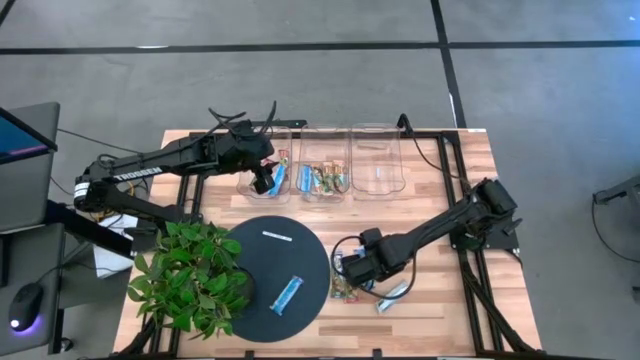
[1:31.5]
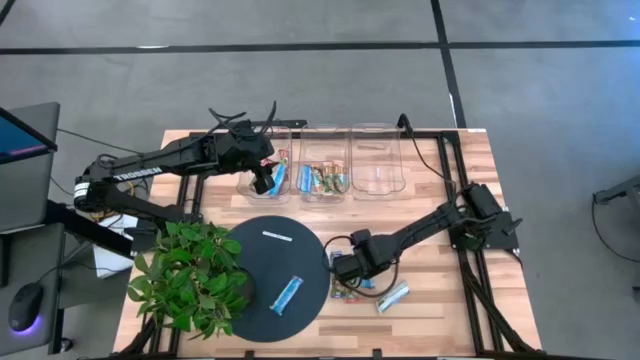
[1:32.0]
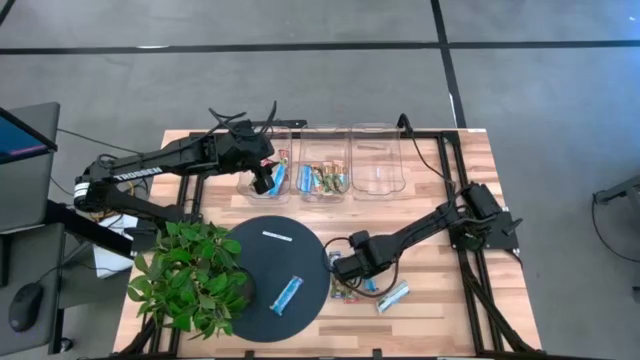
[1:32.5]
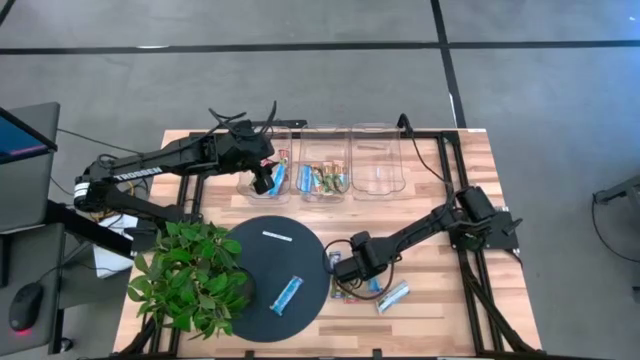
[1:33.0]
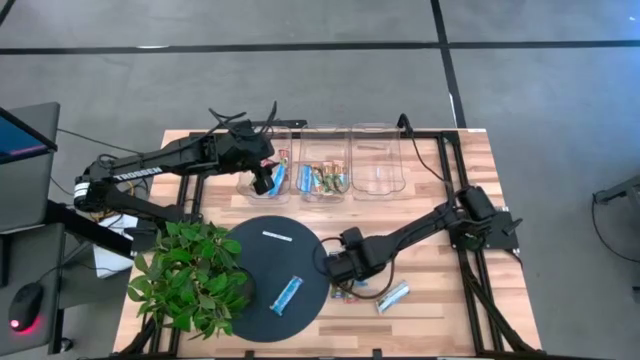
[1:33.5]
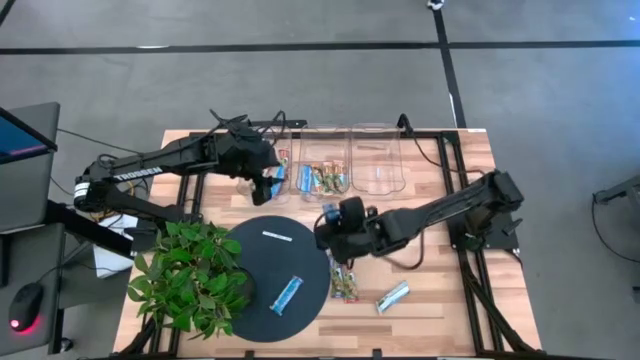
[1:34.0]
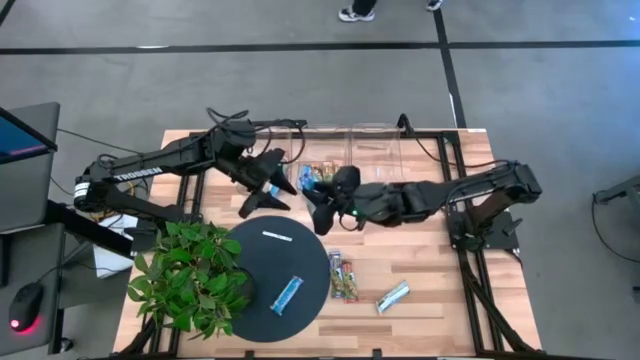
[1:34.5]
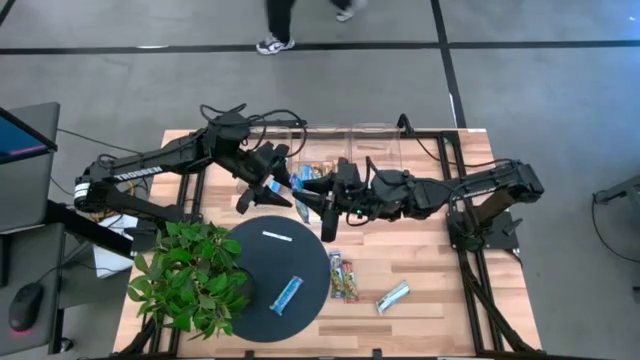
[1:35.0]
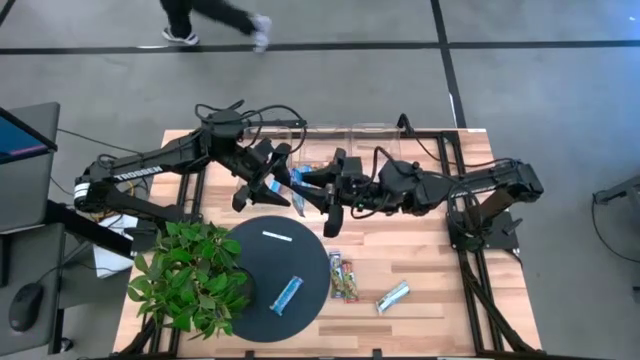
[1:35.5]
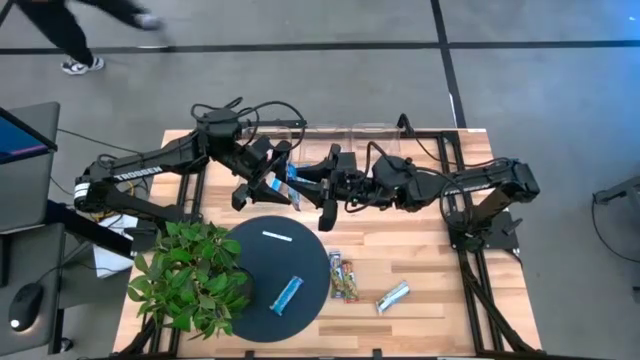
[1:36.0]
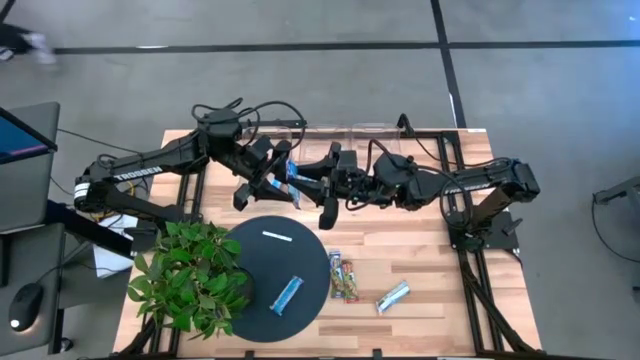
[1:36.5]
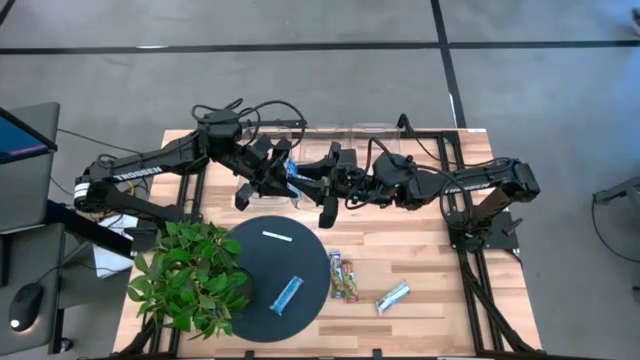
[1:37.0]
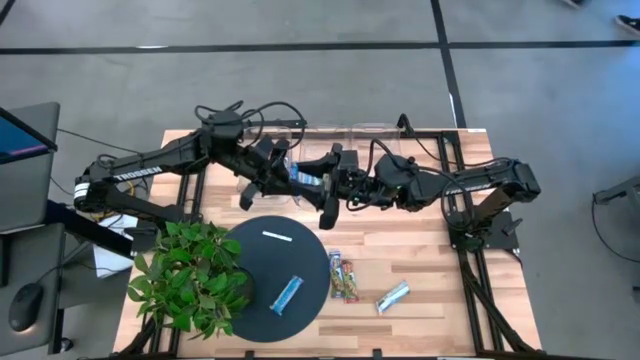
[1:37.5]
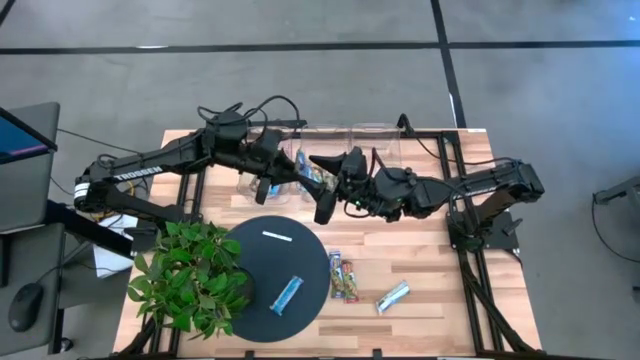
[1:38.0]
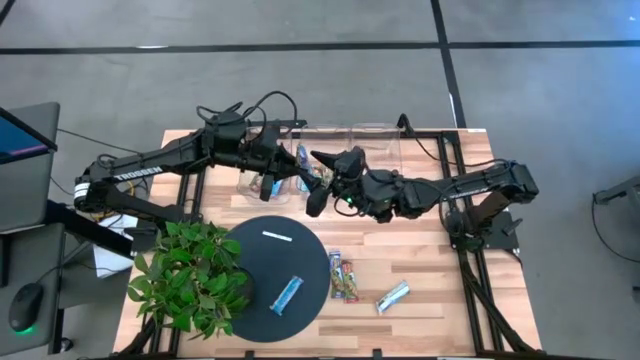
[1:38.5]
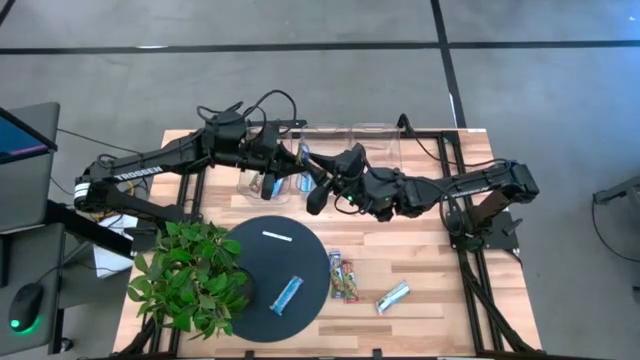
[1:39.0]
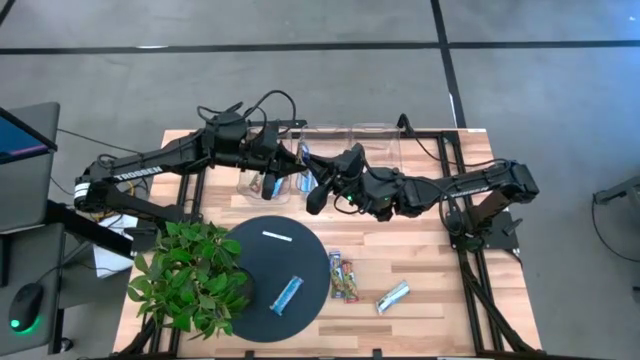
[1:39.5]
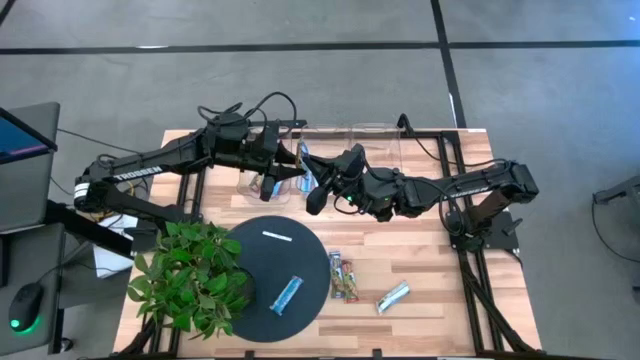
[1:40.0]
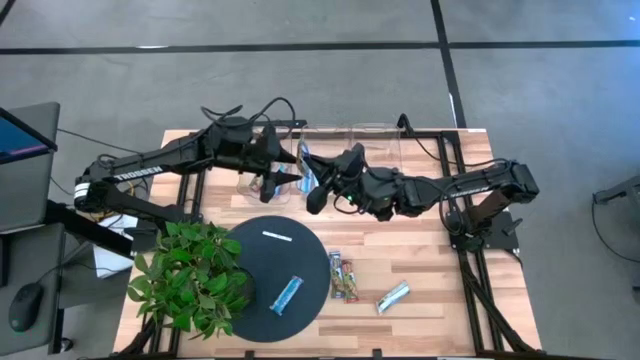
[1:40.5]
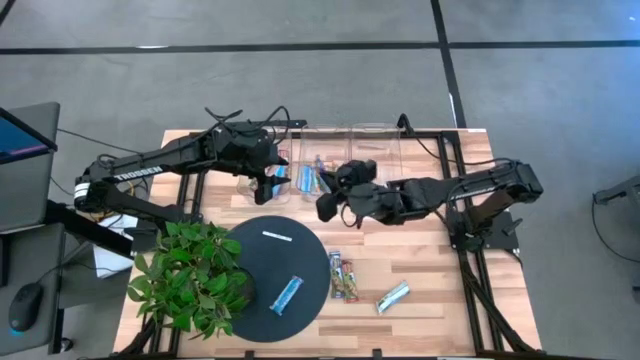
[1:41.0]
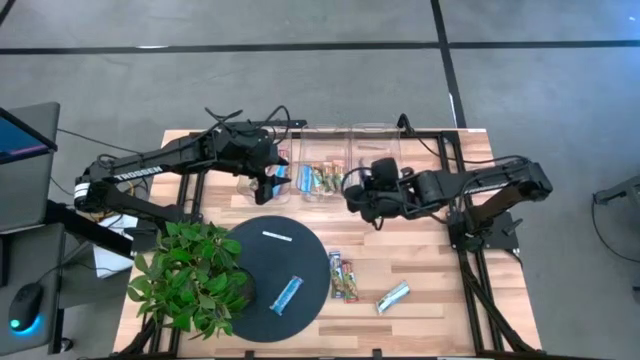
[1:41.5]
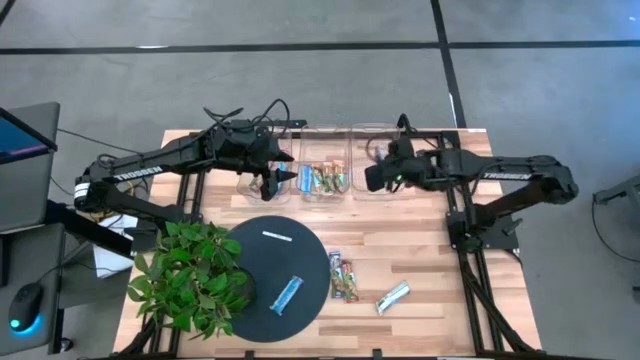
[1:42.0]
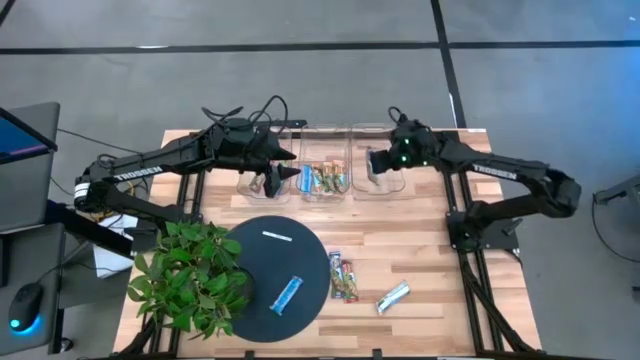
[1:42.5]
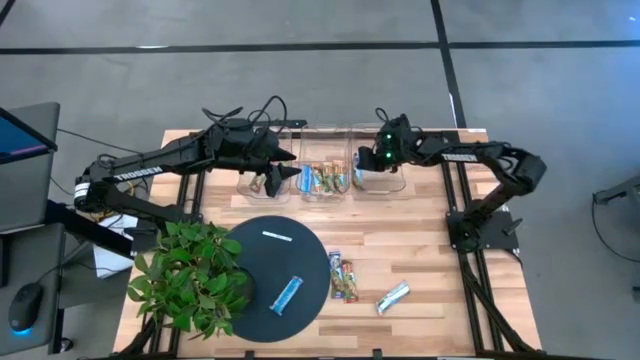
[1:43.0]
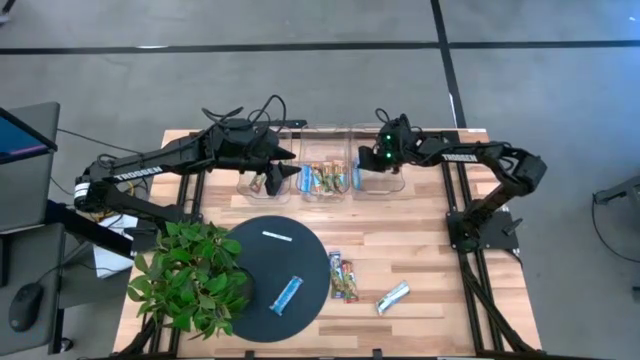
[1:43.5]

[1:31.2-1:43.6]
Task: Pick and place Granola Bars by type
Put the blue granola bar into the right transparent bin

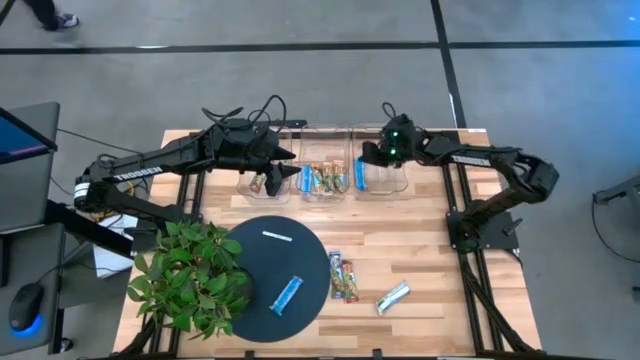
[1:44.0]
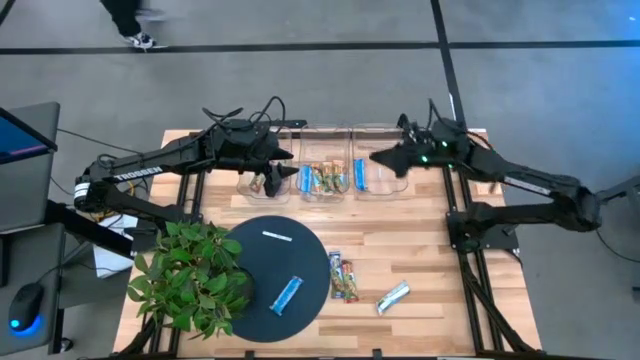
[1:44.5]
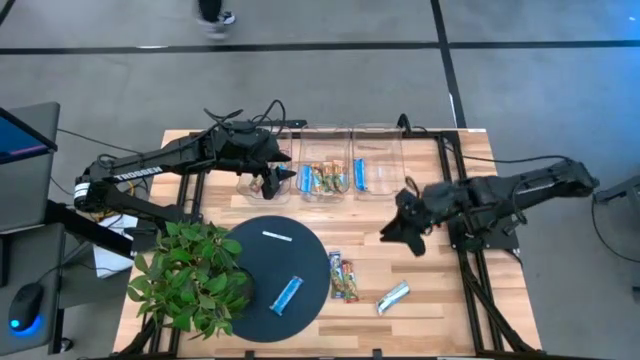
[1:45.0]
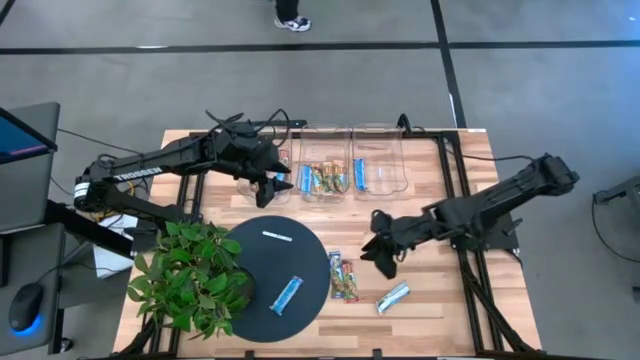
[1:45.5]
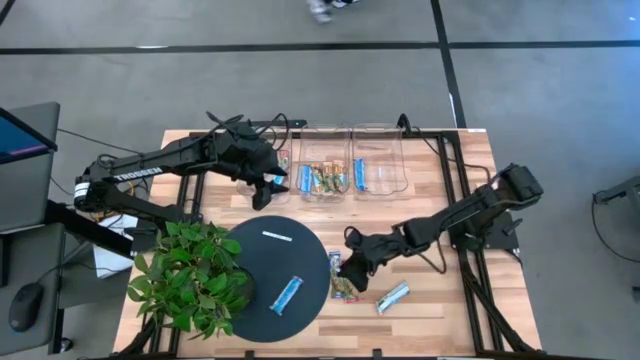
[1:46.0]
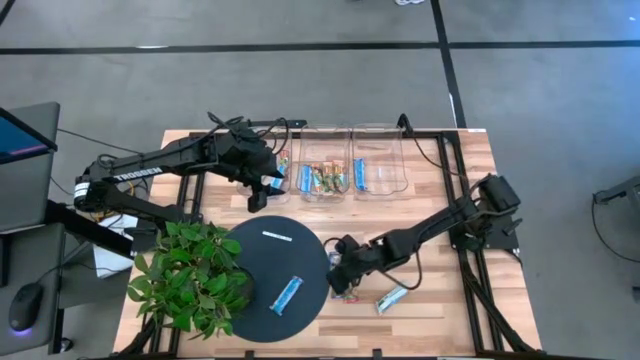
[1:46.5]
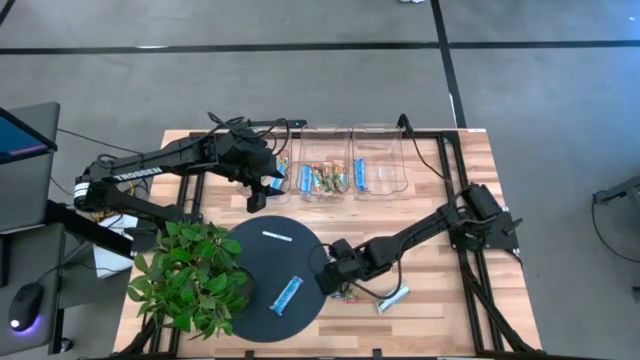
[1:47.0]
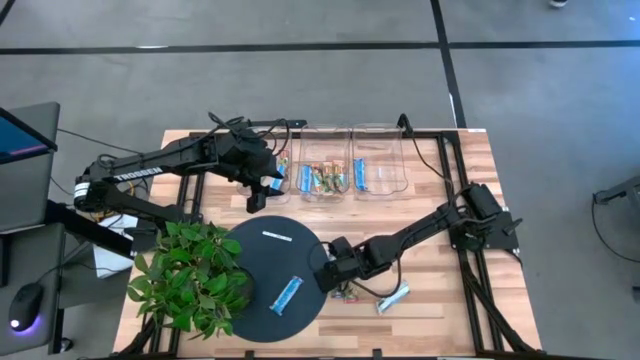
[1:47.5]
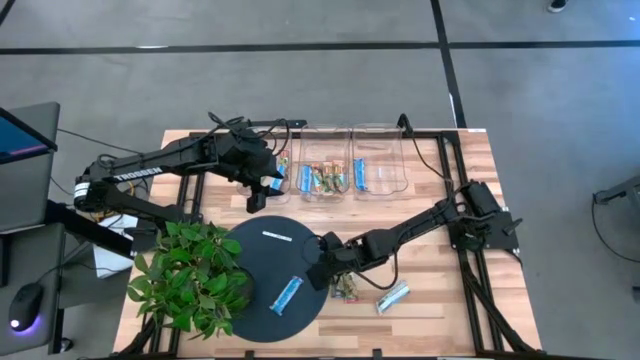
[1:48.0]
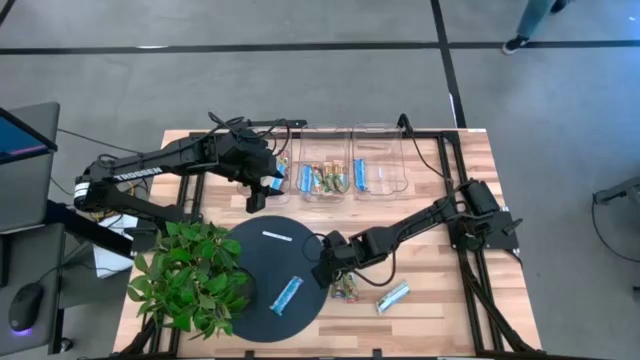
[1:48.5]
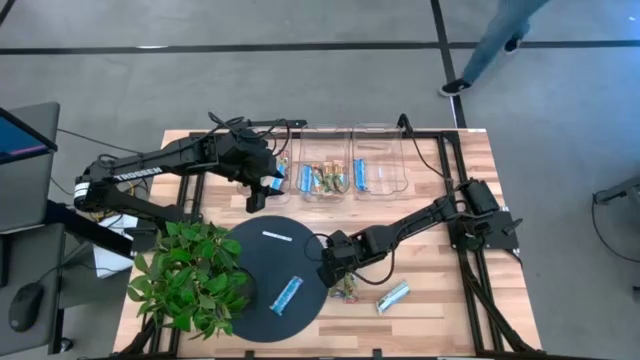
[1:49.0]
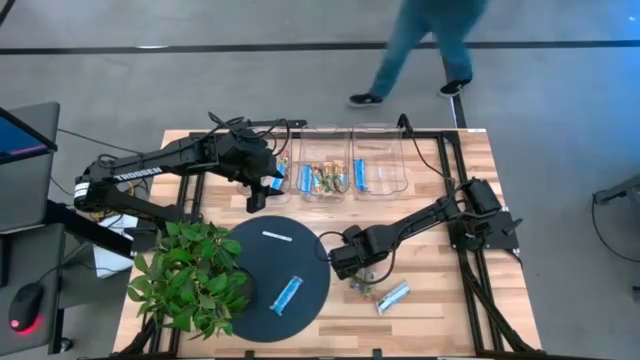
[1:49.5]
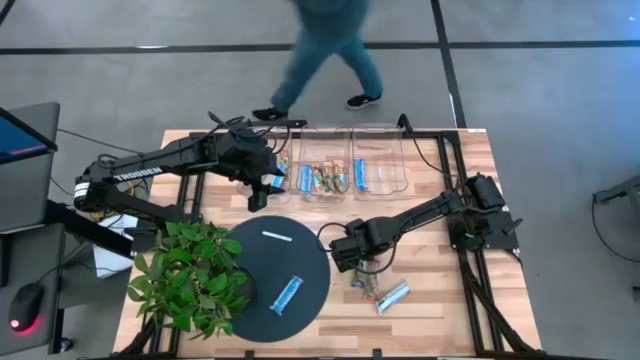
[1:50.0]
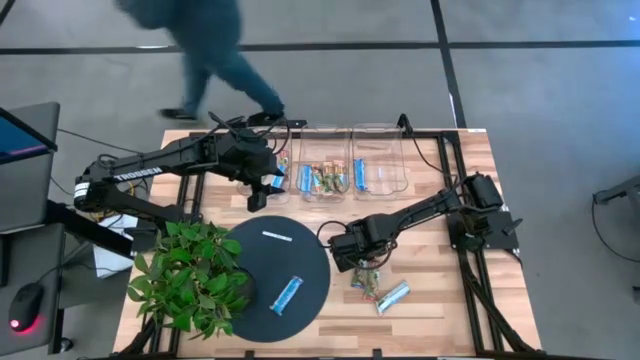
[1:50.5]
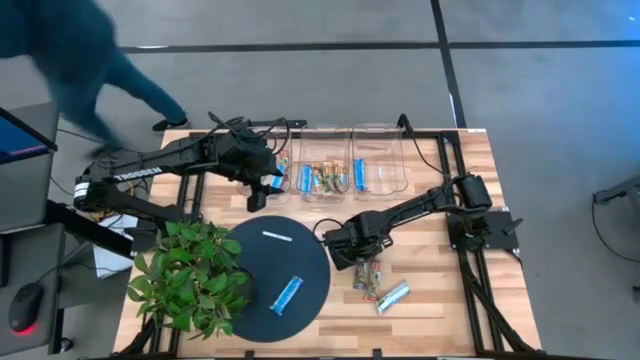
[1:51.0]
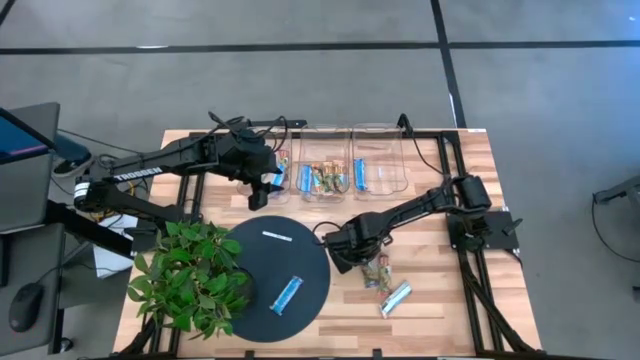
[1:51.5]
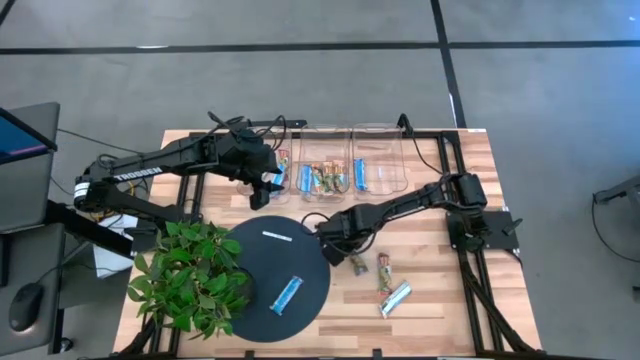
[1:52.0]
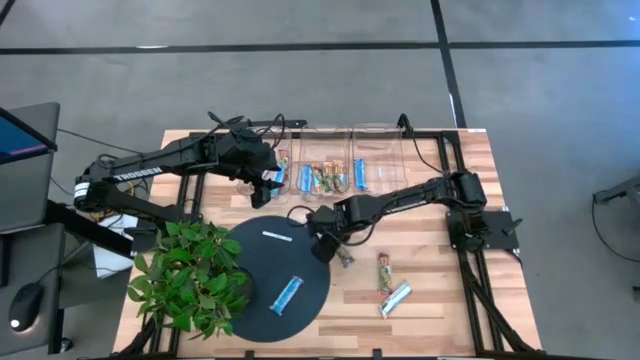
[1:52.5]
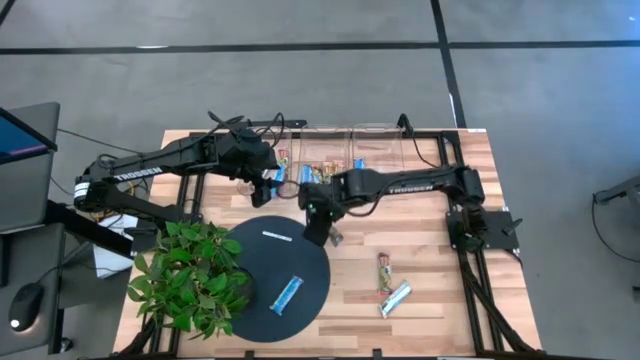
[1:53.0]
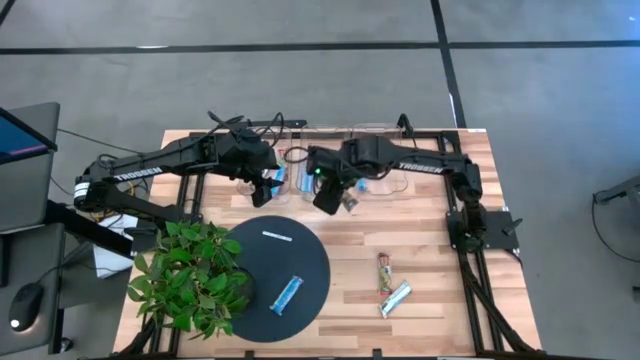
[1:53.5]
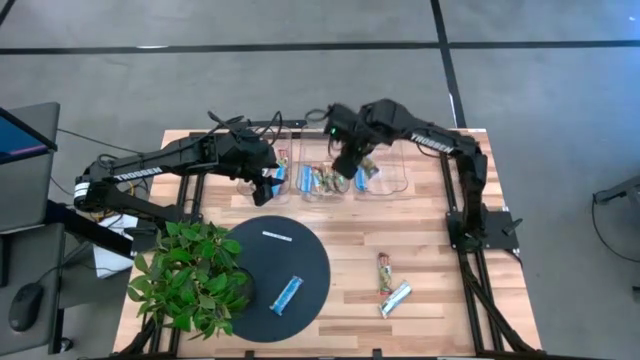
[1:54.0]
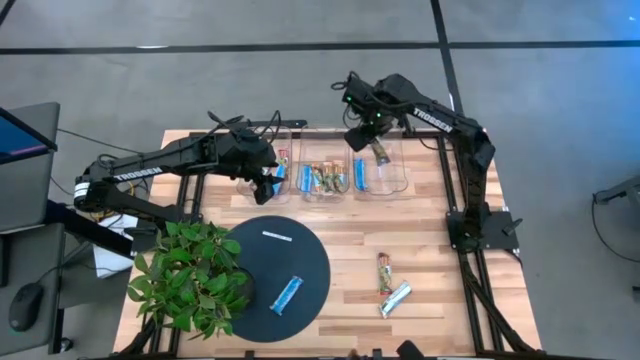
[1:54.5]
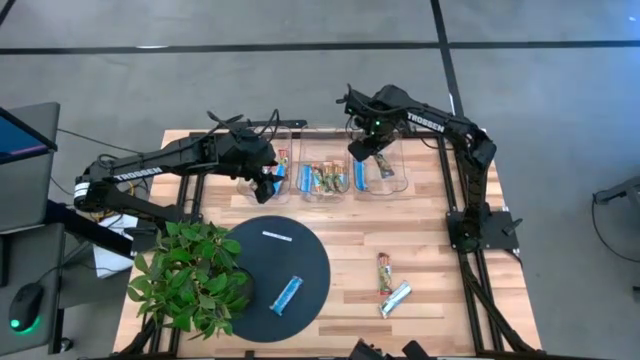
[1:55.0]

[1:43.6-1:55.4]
Put the blue granola bar into the right transparent bin
